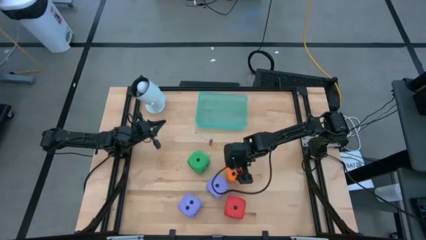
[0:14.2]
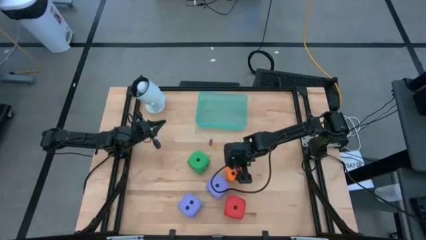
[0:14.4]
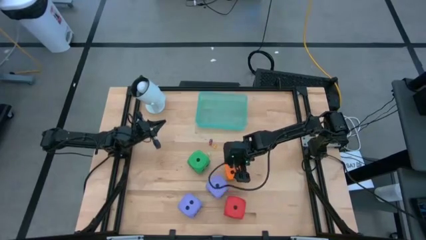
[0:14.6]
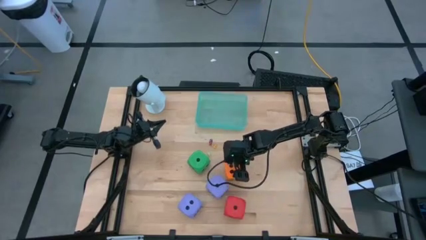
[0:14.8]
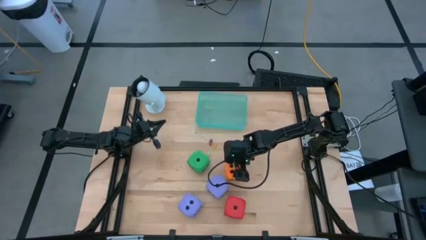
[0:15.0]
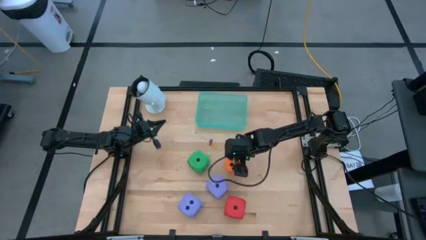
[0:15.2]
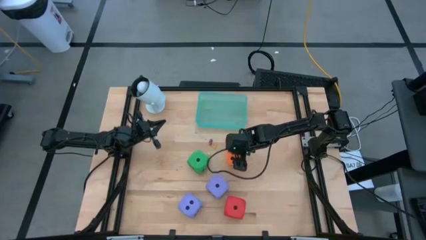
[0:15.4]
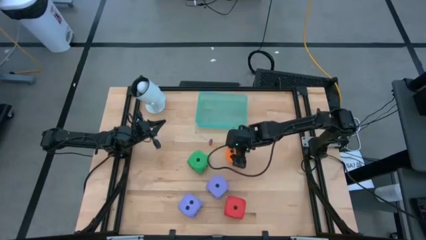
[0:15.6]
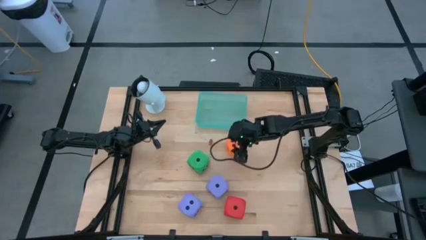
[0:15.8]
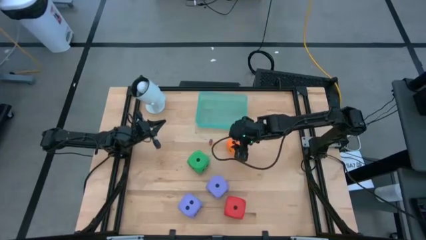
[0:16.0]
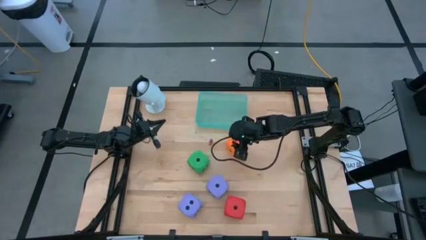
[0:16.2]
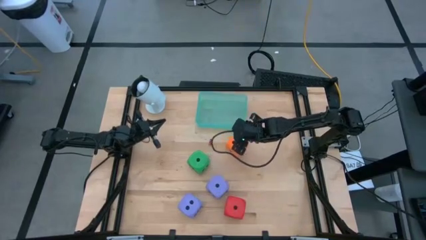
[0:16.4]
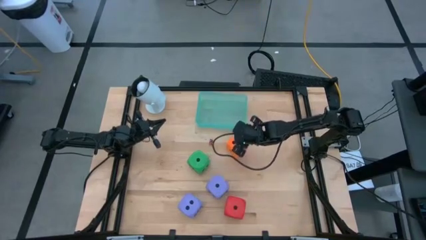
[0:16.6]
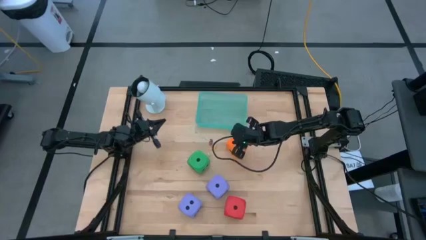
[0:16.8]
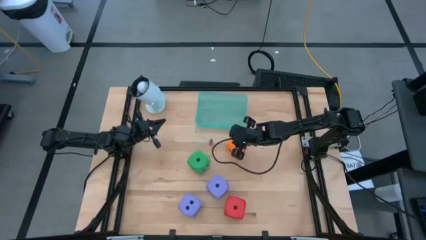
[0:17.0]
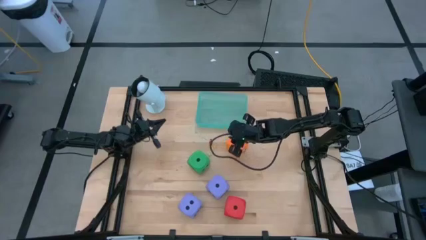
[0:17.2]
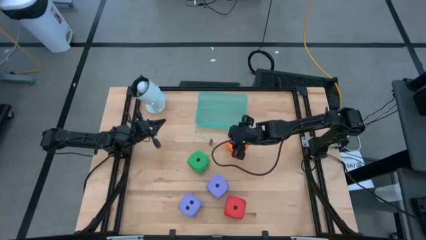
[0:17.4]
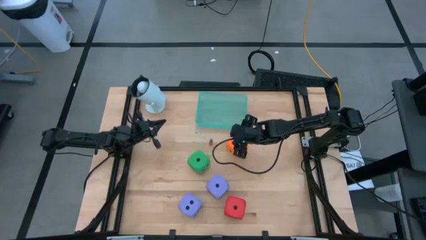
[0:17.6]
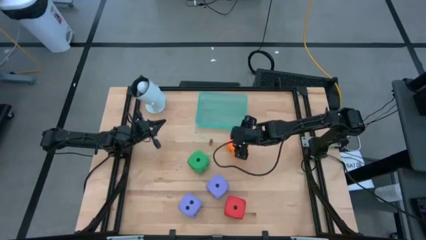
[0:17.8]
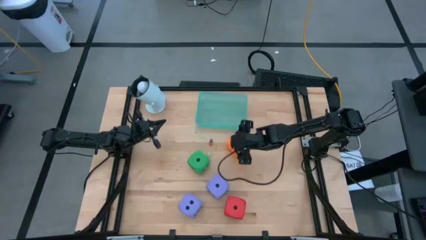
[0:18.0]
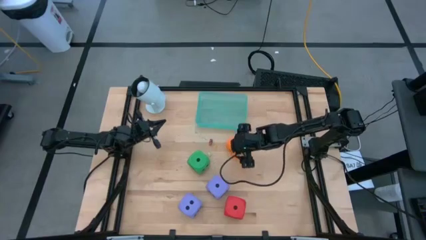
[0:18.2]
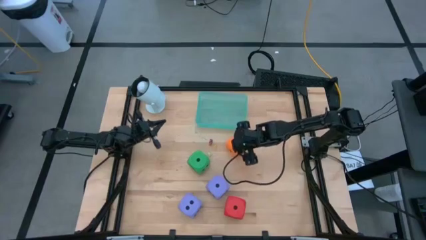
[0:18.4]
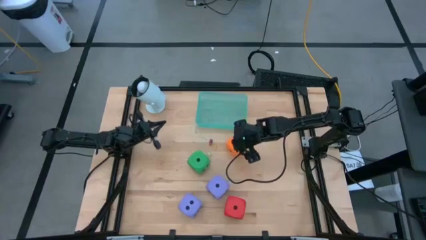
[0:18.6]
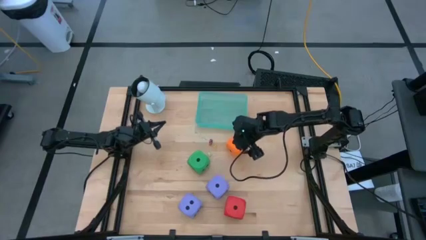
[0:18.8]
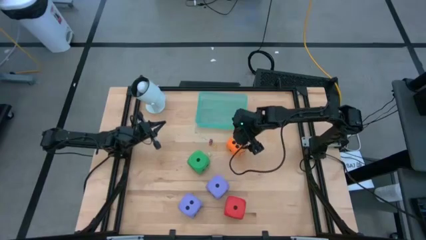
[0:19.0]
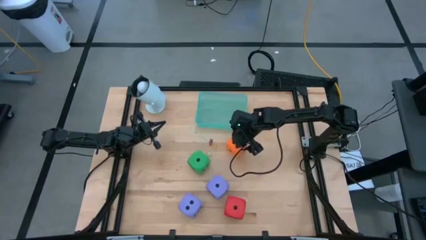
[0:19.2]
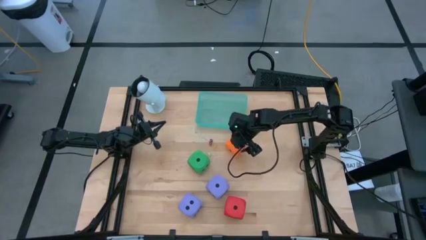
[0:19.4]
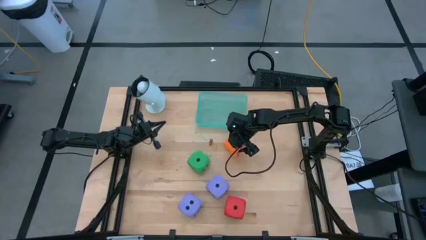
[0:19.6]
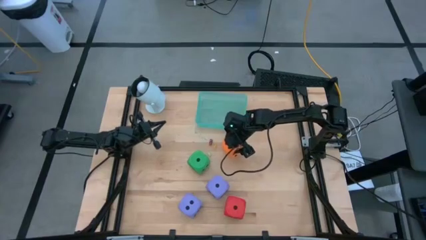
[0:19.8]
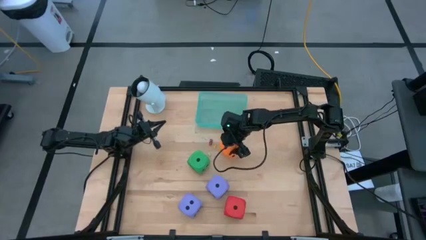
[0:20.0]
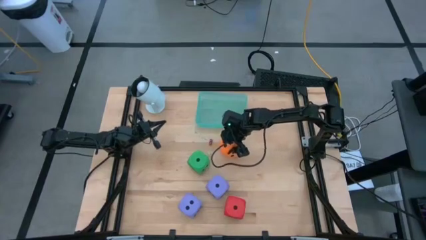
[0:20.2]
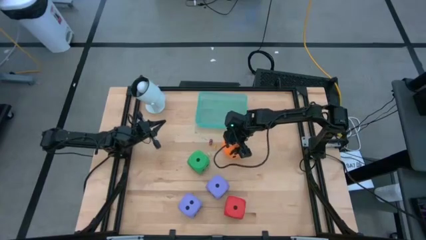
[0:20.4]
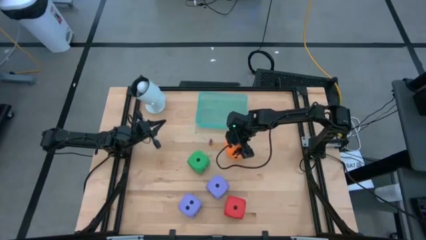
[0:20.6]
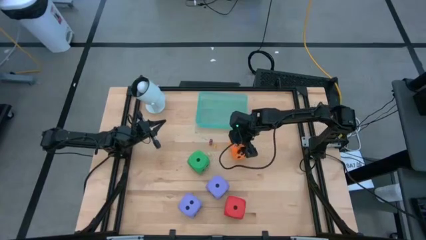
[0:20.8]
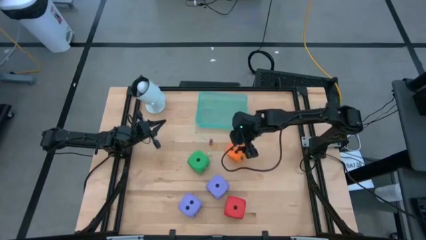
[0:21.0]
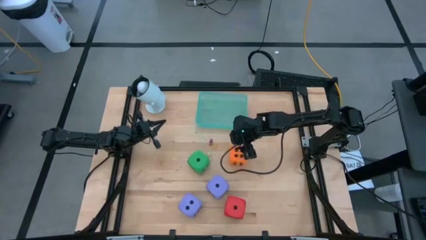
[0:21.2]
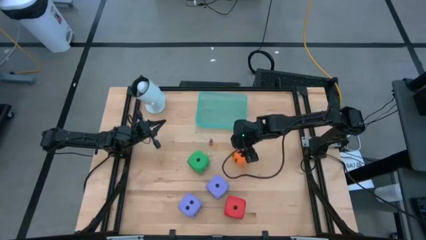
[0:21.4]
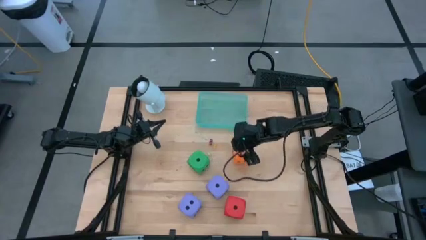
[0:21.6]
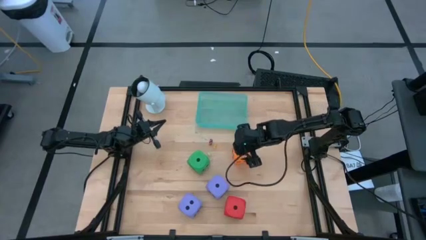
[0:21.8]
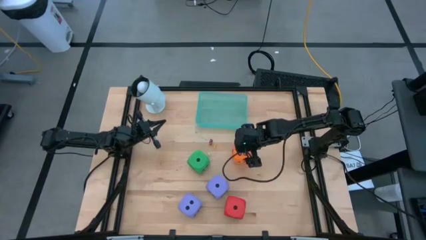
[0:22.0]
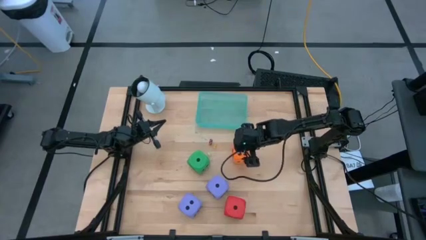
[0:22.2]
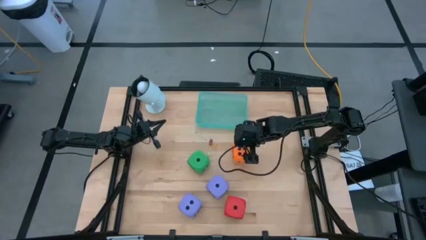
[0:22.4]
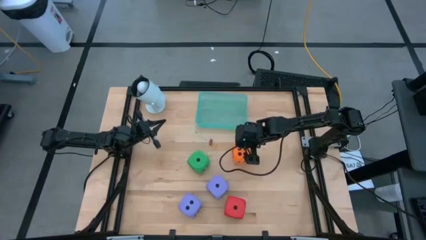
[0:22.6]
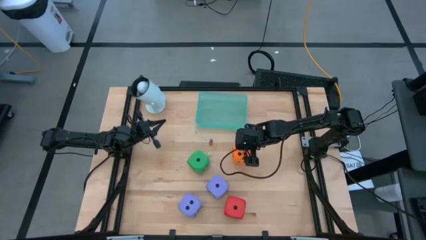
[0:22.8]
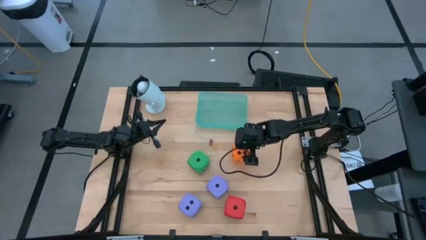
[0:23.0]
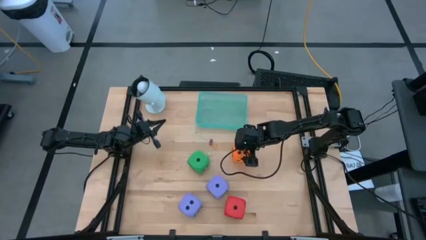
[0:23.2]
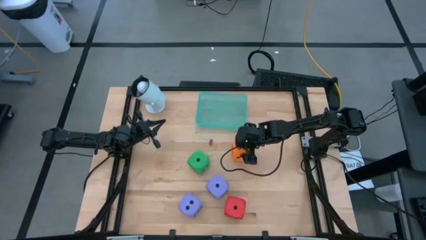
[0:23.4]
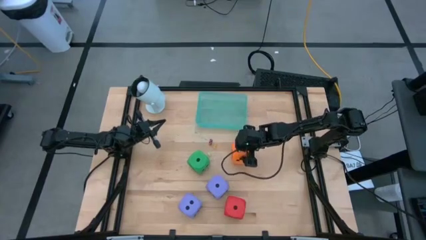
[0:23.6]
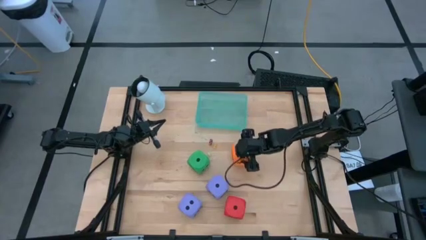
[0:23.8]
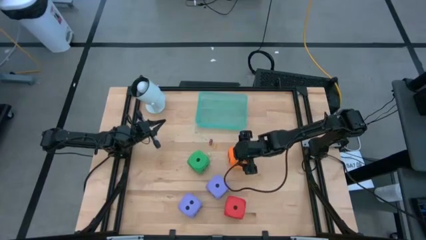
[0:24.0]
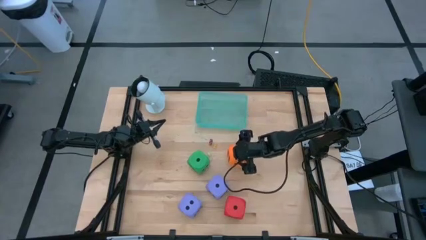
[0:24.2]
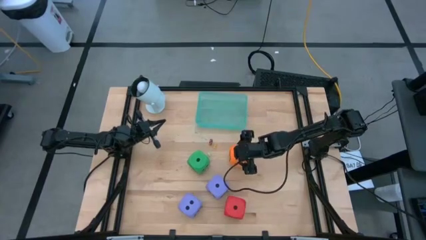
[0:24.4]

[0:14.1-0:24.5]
Task: Pick & Place Dice
Put the big orange dice into the bin
